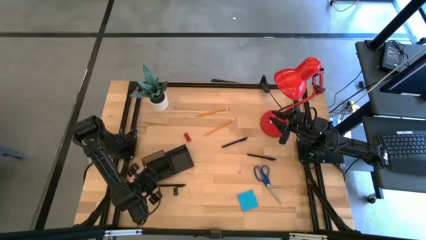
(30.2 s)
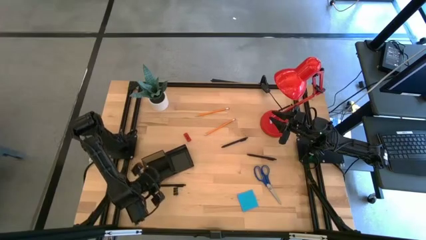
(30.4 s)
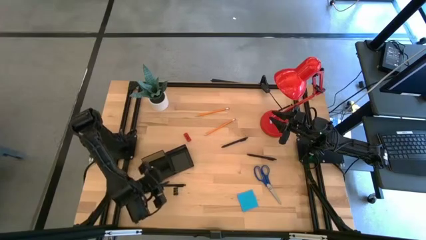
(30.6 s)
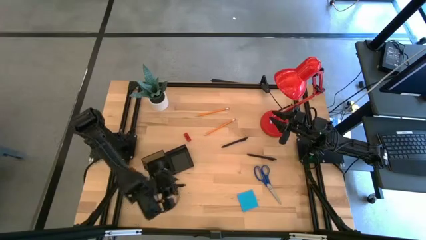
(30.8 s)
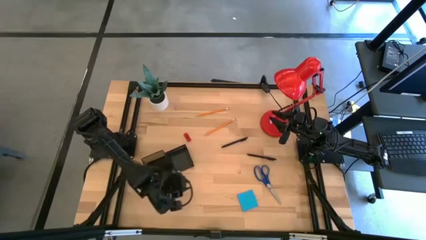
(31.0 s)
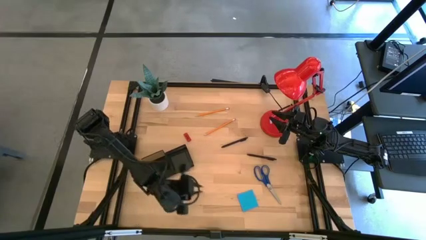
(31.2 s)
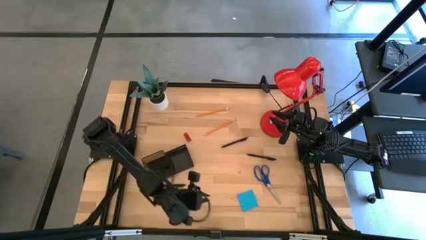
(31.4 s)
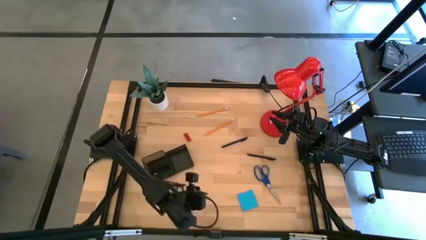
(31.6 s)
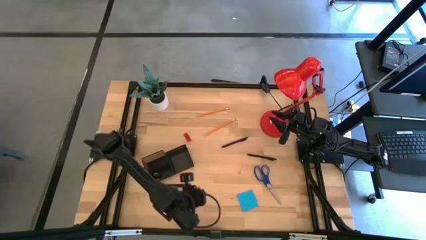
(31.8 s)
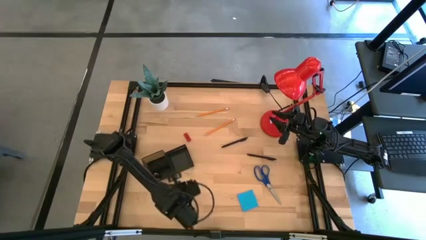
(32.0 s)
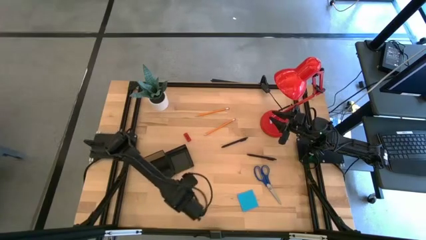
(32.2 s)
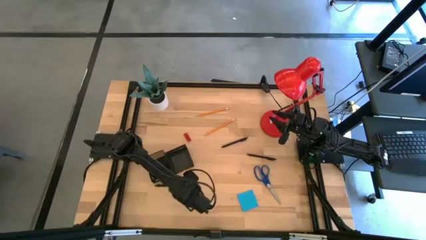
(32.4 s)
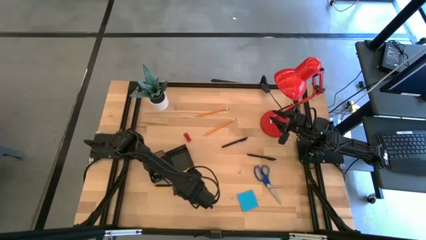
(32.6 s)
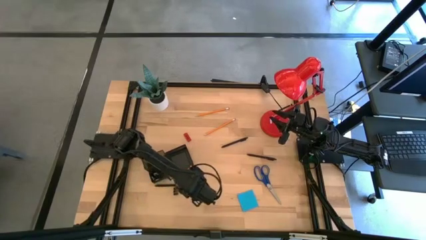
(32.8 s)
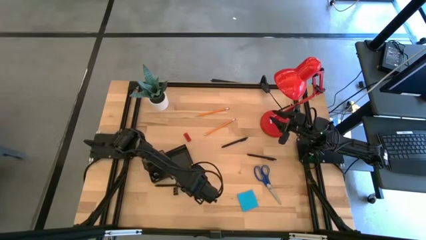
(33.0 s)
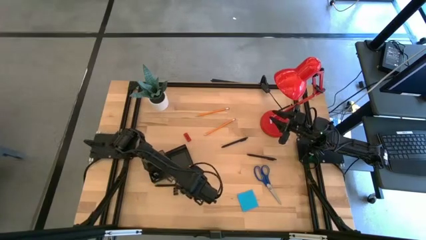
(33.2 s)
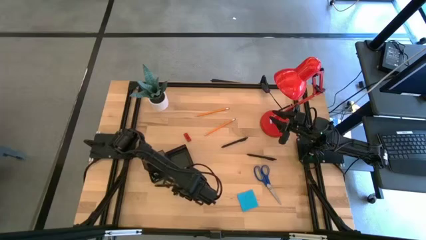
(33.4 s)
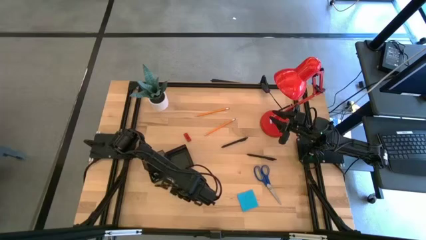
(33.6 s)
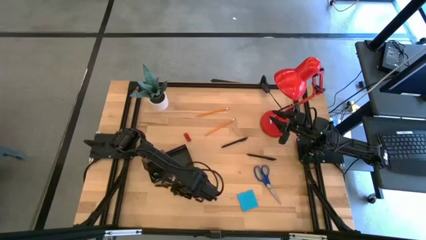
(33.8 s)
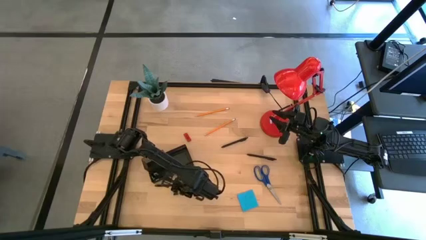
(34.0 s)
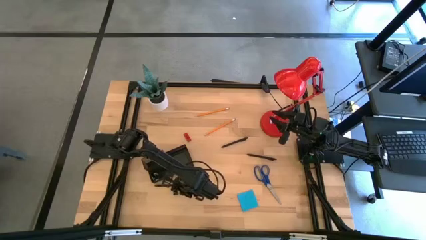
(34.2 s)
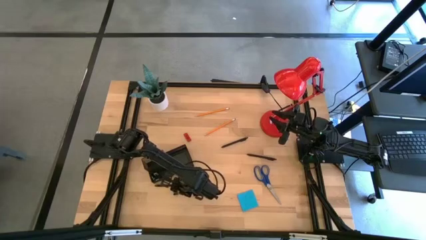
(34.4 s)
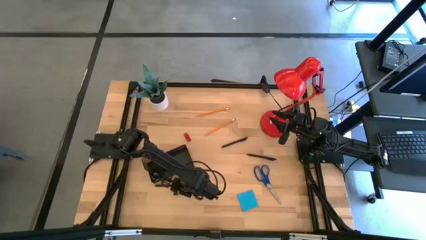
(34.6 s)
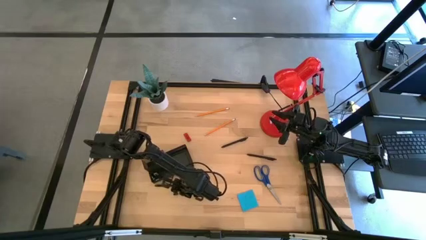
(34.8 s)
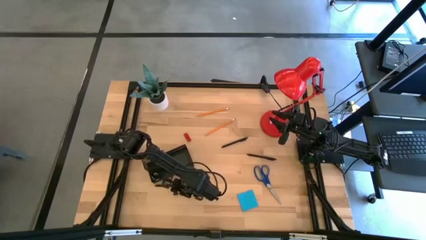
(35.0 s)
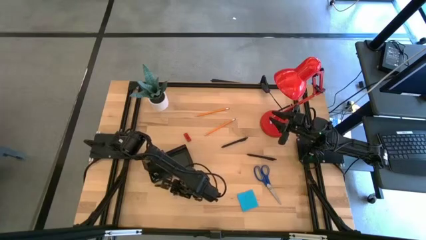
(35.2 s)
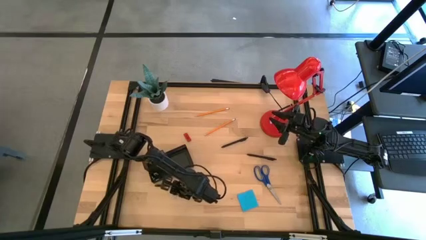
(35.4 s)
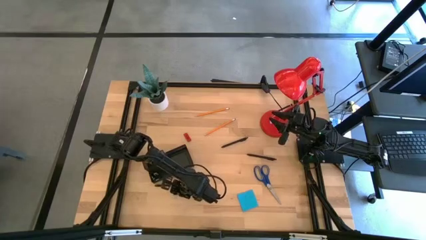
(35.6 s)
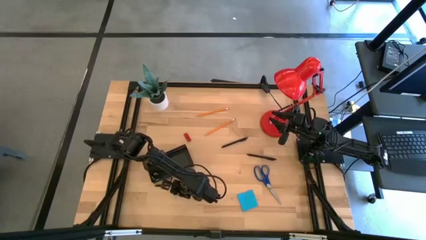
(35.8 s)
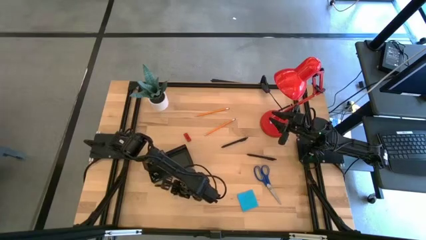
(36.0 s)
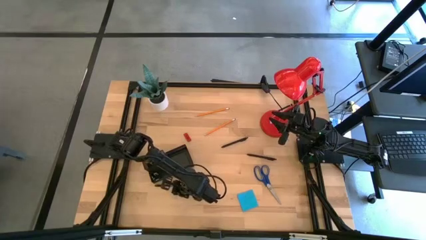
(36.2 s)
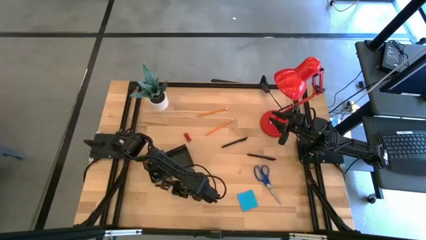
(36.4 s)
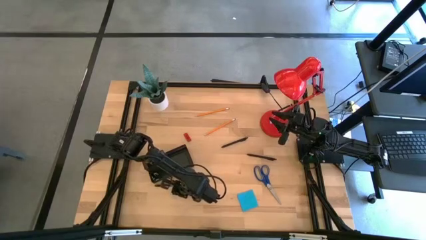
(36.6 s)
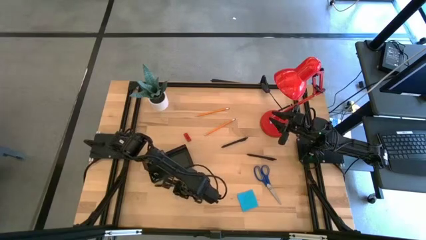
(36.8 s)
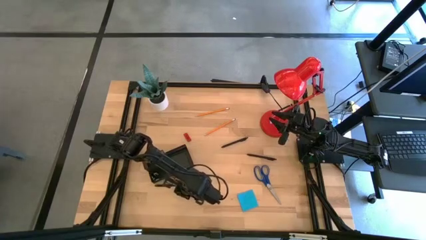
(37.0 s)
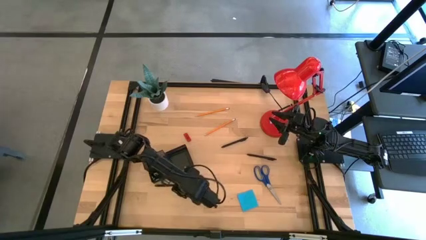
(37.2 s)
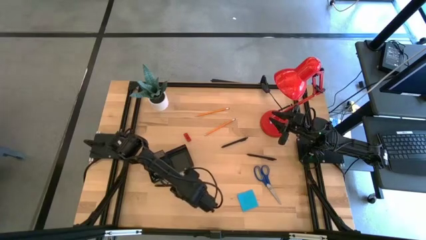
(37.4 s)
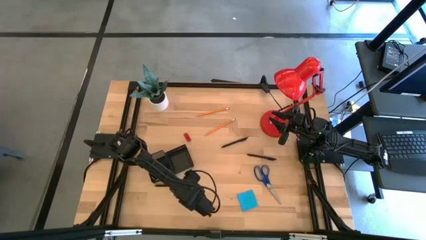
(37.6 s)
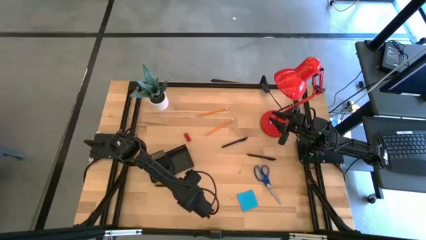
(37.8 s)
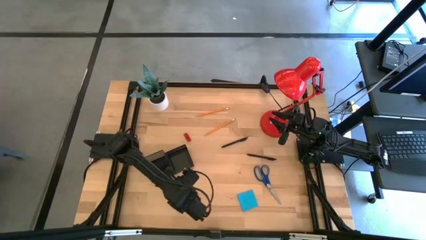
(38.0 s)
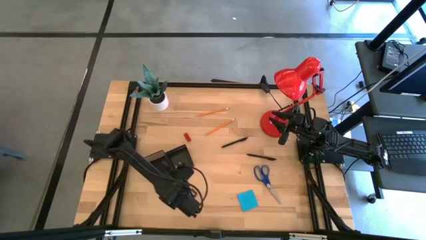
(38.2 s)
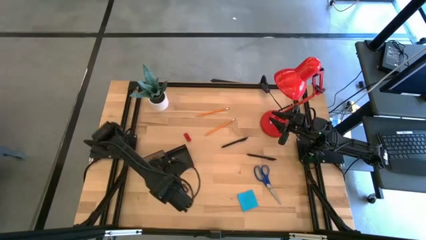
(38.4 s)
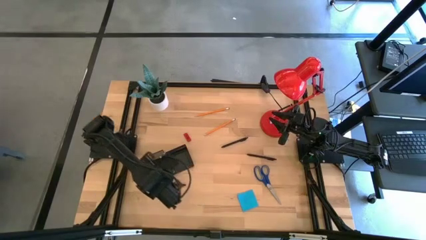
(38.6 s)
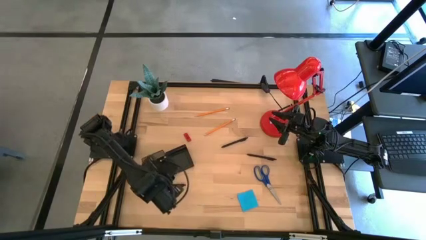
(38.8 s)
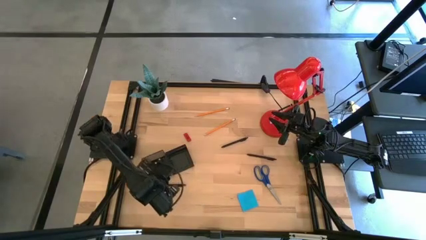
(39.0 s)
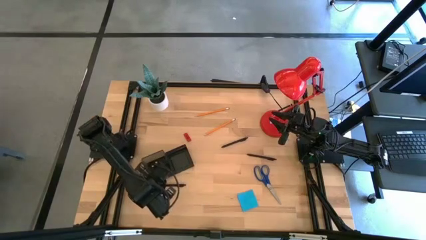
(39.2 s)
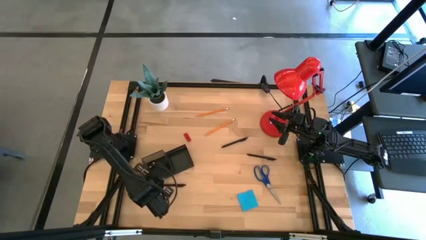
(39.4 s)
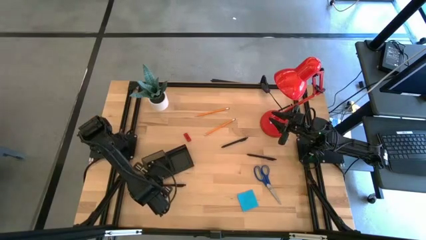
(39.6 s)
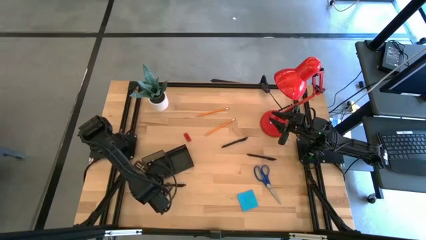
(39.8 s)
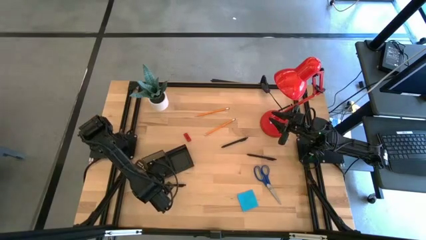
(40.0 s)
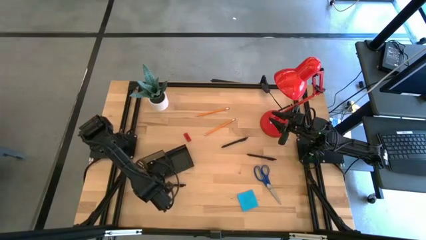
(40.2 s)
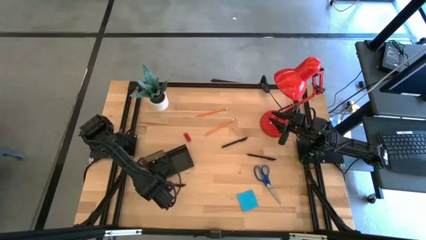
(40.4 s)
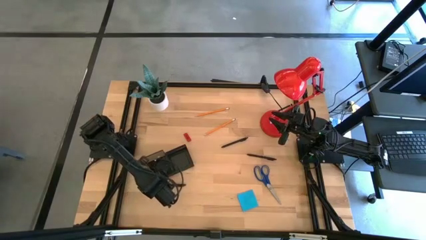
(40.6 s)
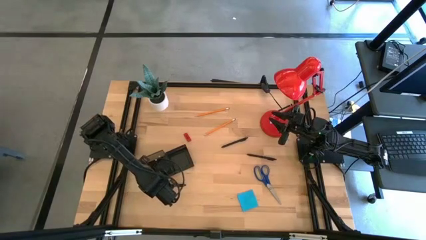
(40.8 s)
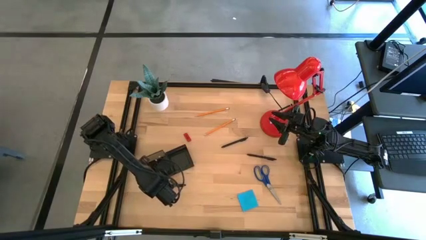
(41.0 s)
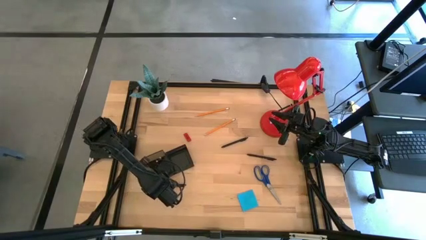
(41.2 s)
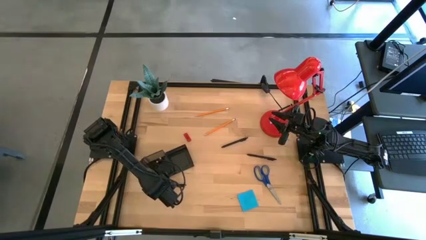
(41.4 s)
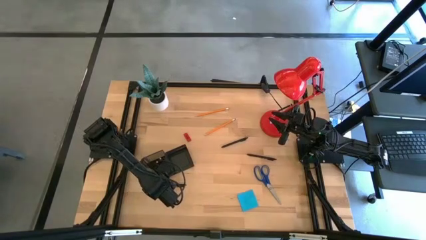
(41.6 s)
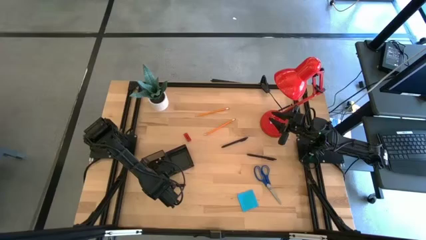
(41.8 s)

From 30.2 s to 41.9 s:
Task: Pick and place office supplies into organizer
Put the binder clip into the front left compartment of the desk organizer

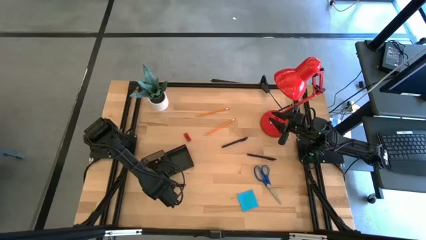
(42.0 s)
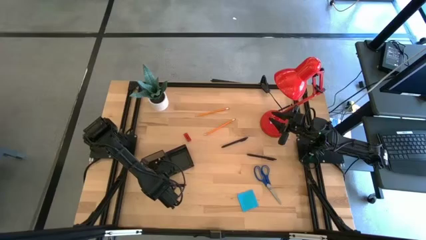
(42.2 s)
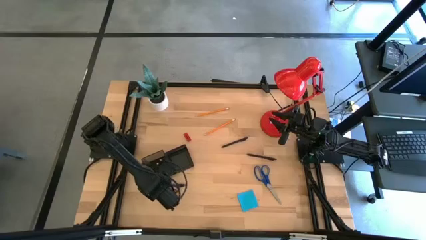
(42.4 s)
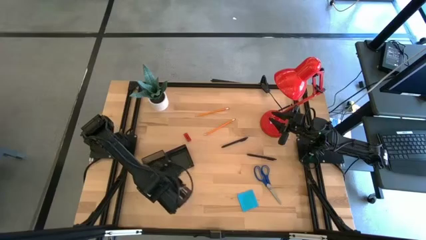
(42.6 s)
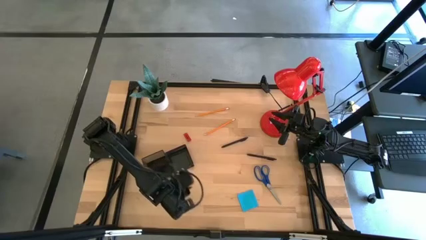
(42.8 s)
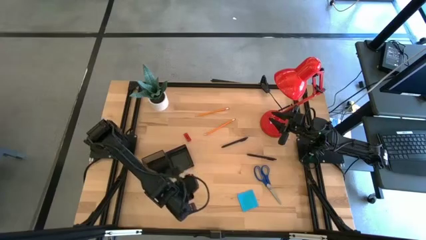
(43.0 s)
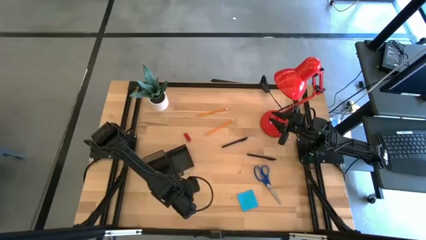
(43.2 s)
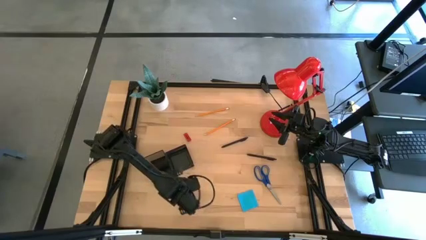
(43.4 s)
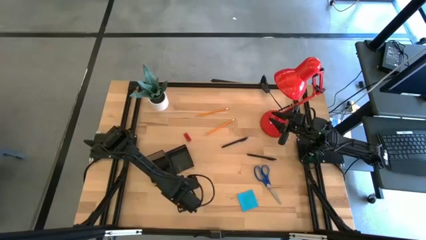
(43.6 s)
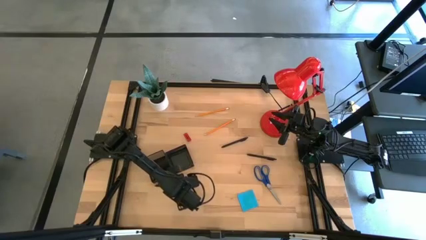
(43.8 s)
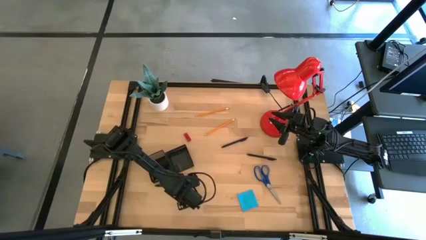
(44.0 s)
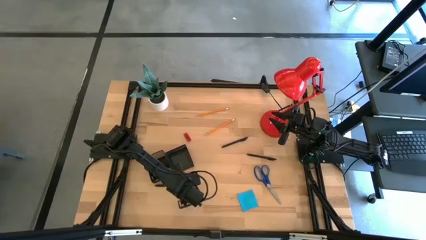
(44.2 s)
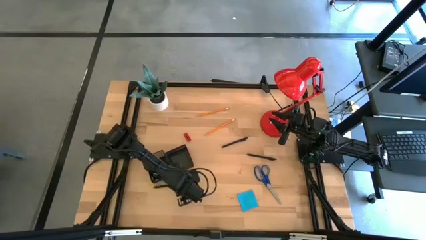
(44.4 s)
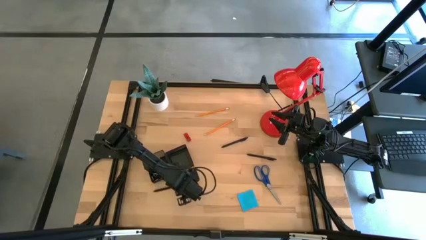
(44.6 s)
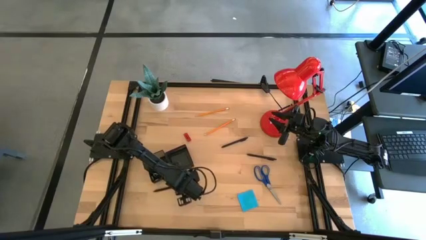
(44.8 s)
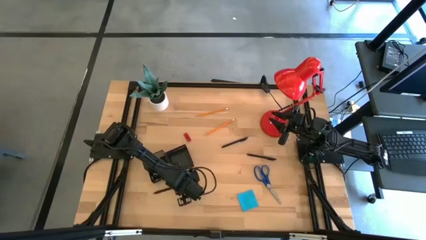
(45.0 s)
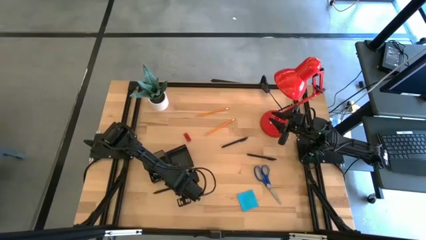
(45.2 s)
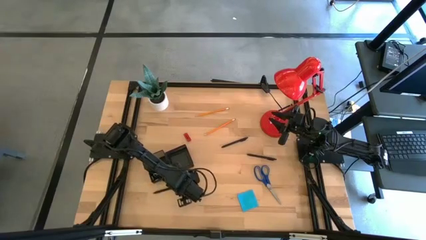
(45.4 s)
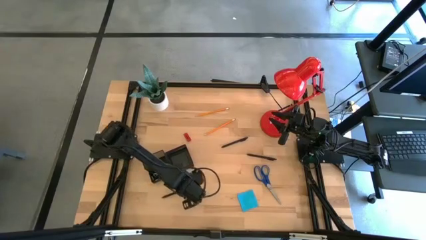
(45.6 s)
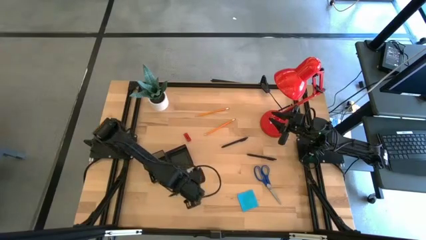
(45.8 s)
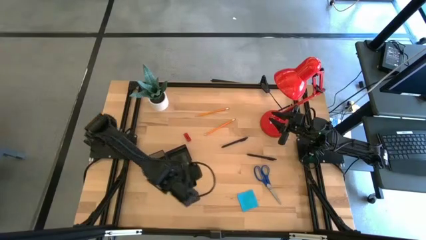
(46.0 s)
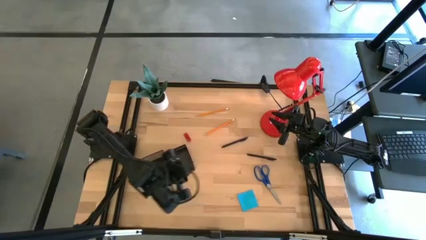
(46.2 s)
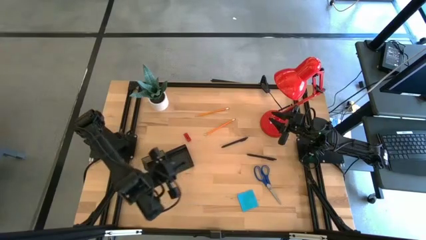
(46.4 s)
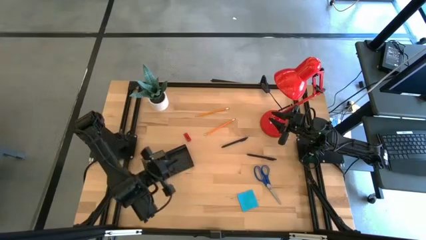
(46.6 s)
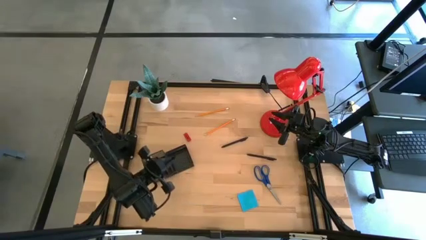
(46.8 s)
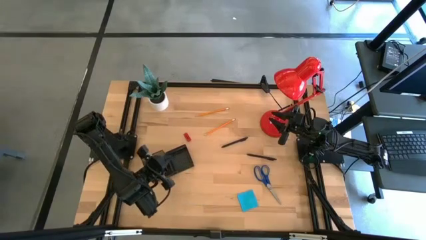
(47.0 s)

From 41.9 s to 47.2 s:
Put the left black pen into the back left compartment of the desk organizer
